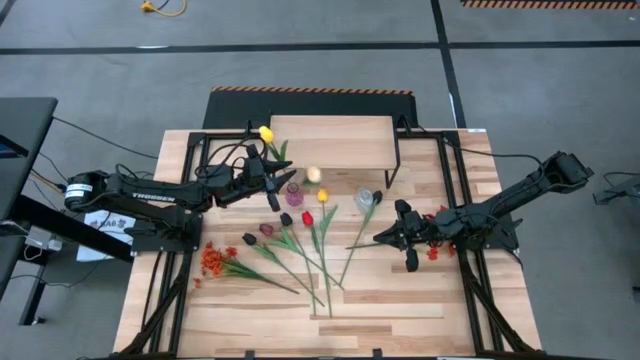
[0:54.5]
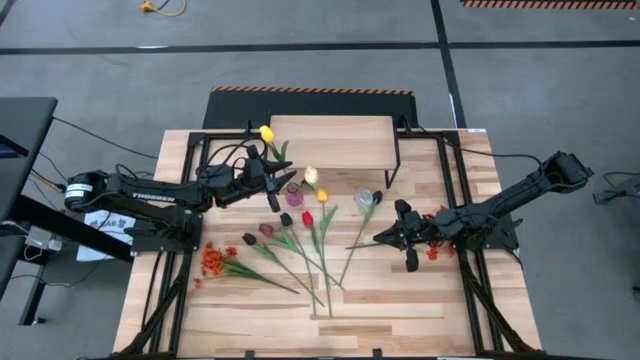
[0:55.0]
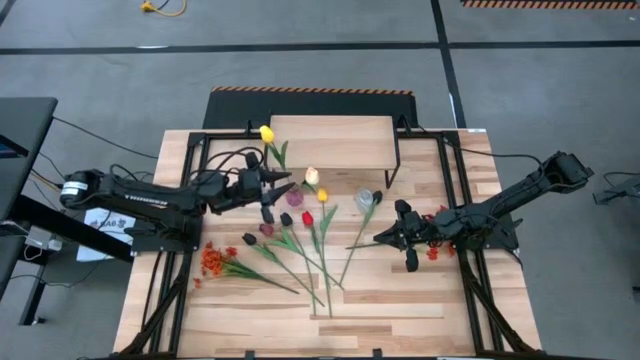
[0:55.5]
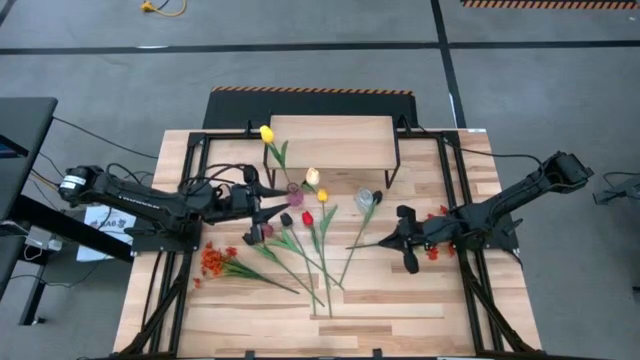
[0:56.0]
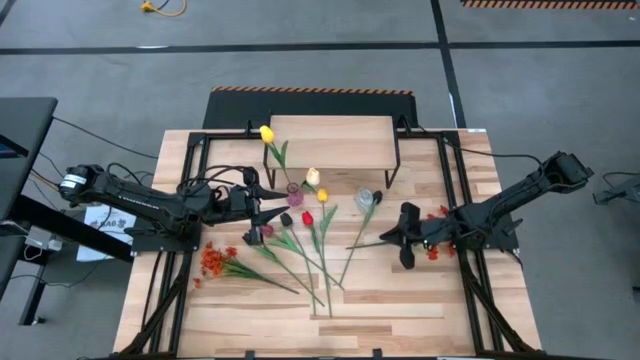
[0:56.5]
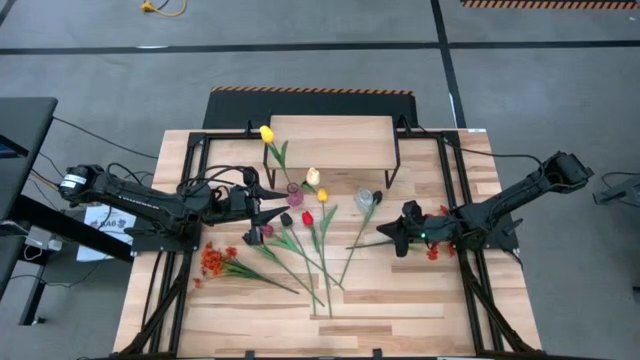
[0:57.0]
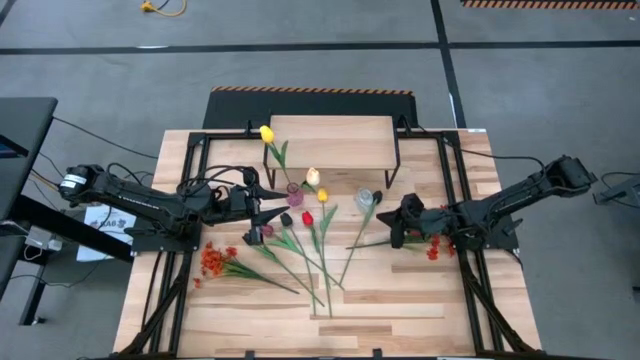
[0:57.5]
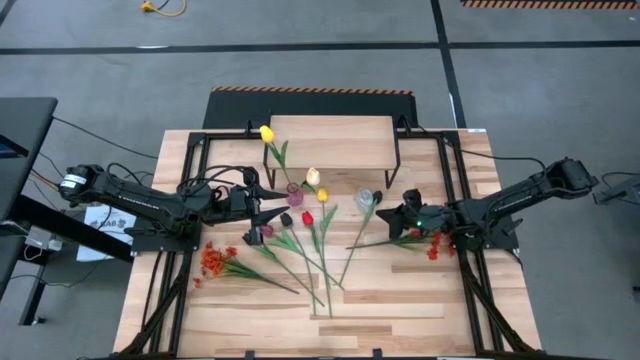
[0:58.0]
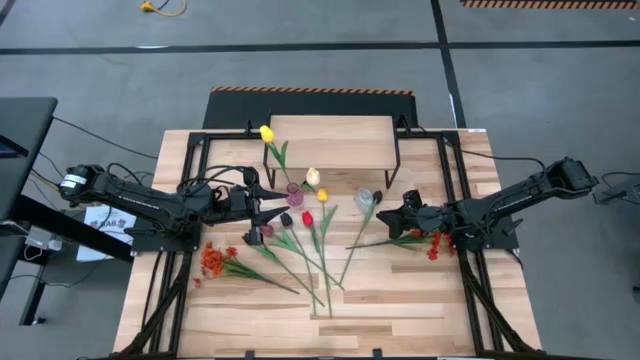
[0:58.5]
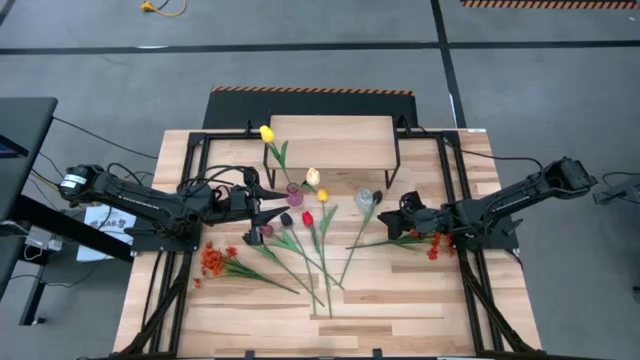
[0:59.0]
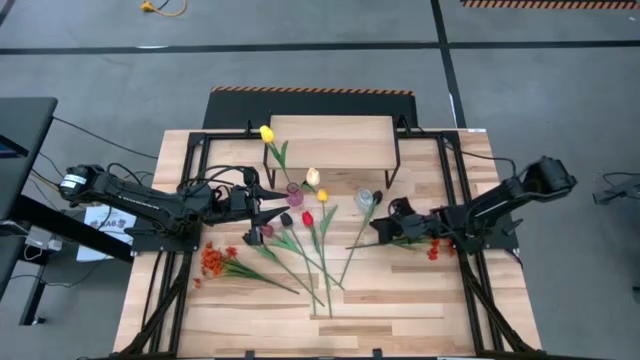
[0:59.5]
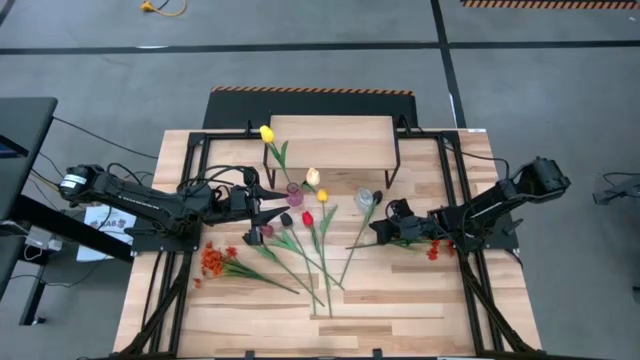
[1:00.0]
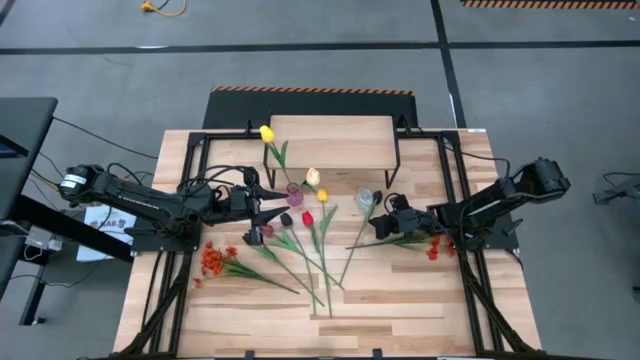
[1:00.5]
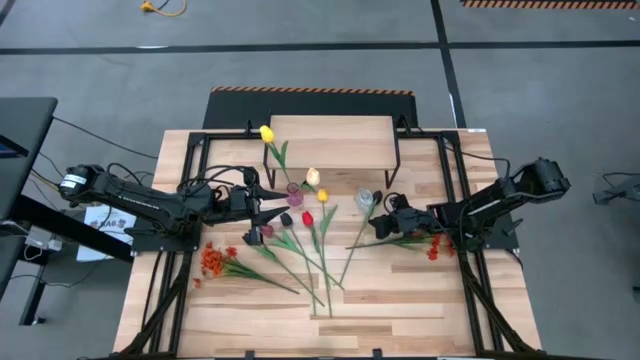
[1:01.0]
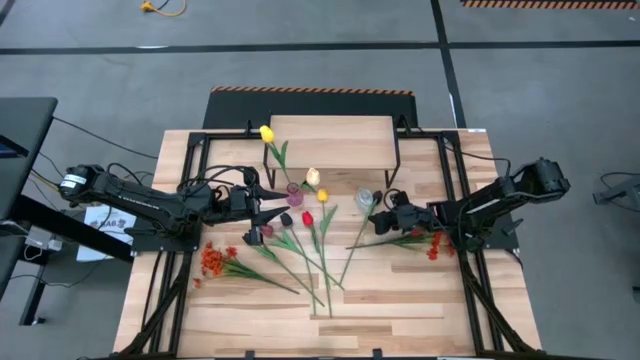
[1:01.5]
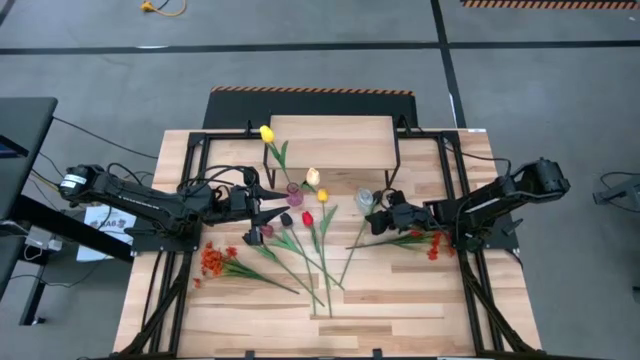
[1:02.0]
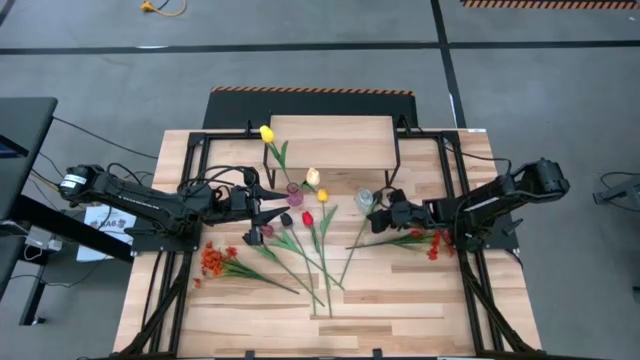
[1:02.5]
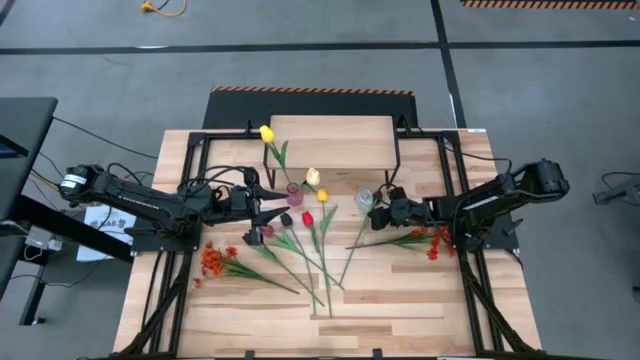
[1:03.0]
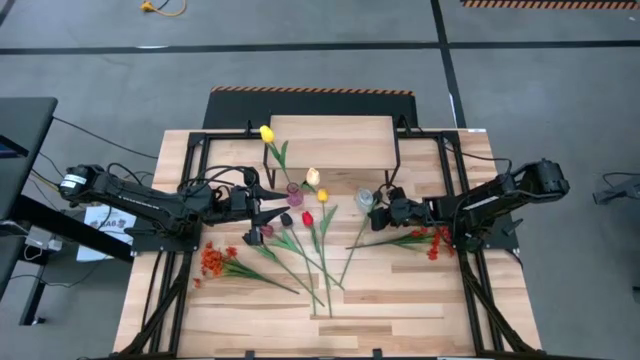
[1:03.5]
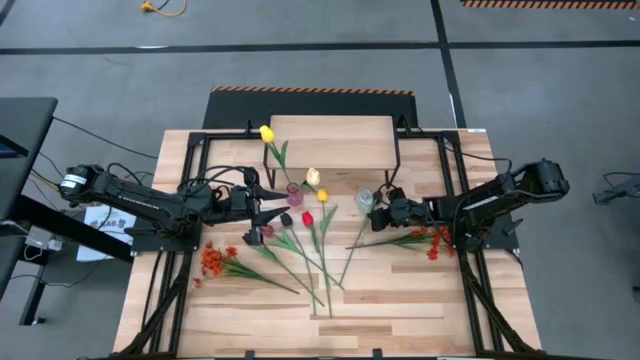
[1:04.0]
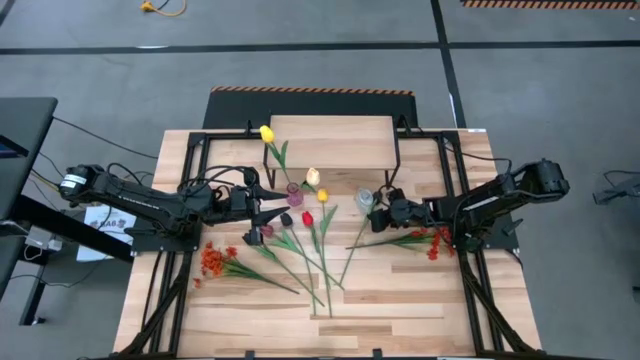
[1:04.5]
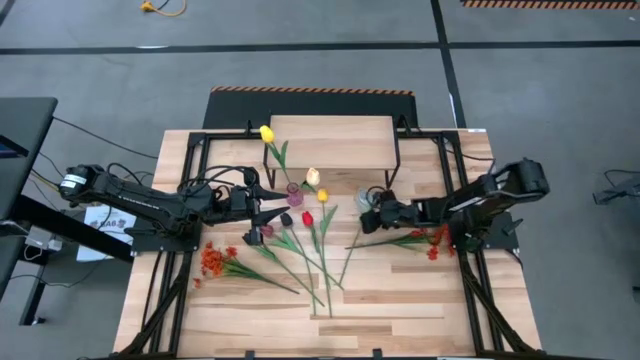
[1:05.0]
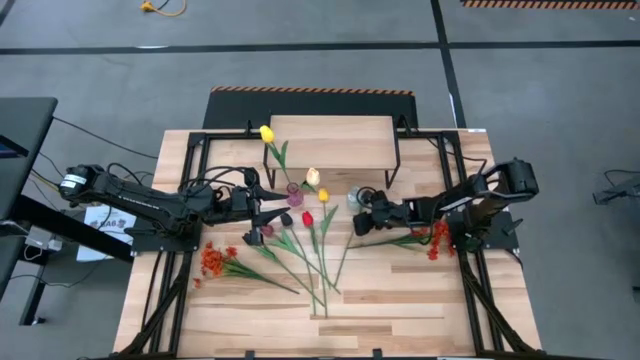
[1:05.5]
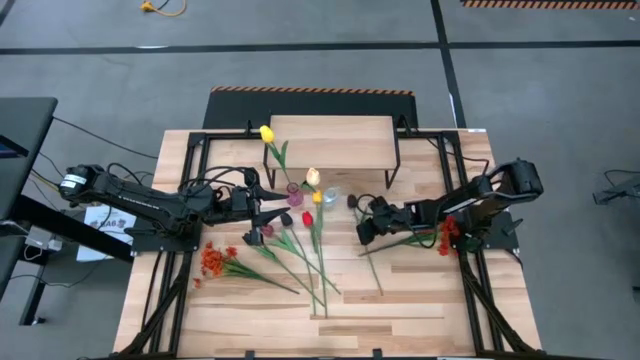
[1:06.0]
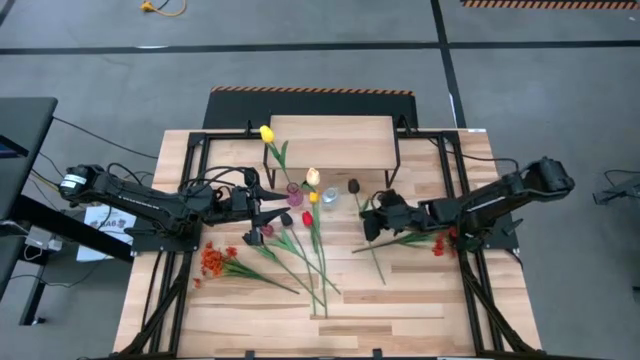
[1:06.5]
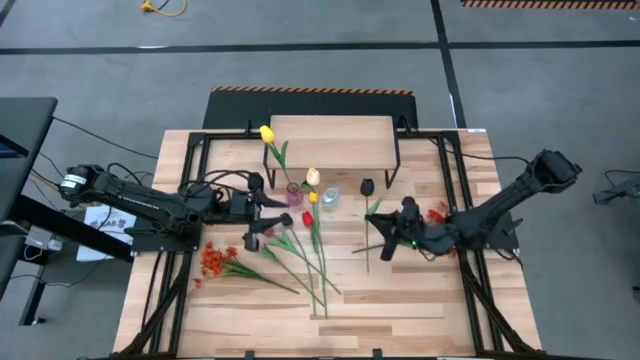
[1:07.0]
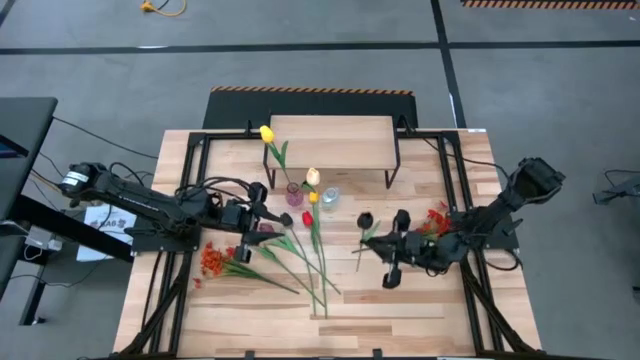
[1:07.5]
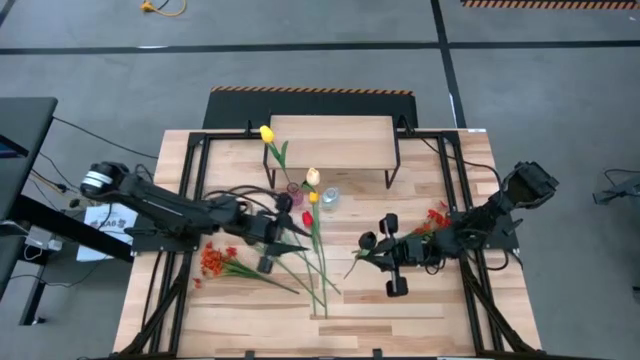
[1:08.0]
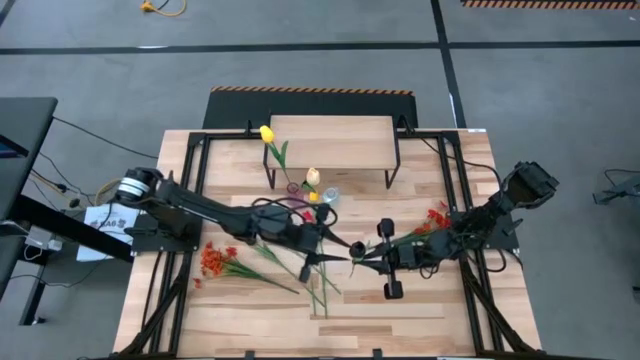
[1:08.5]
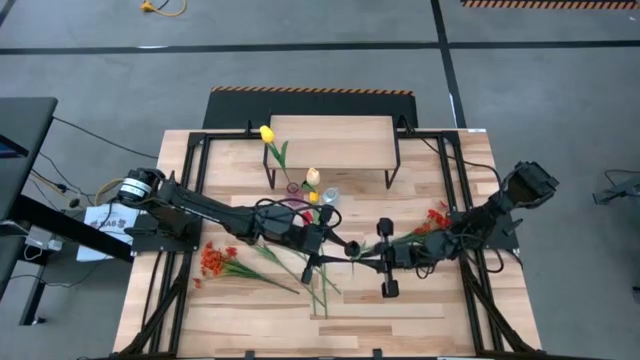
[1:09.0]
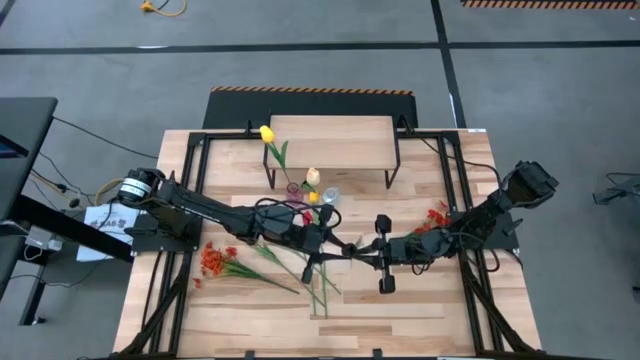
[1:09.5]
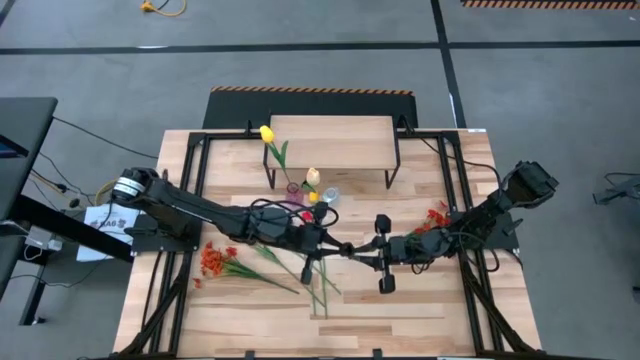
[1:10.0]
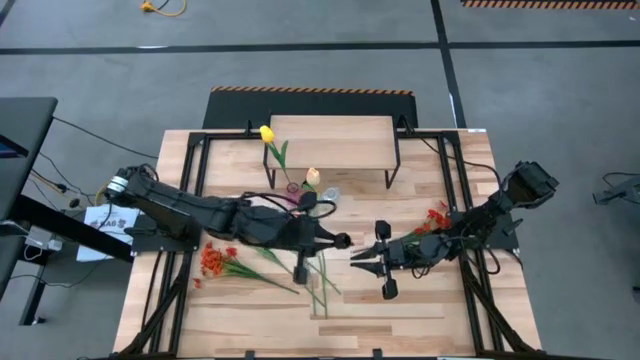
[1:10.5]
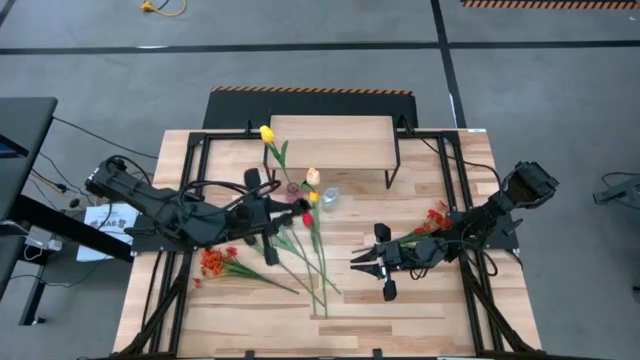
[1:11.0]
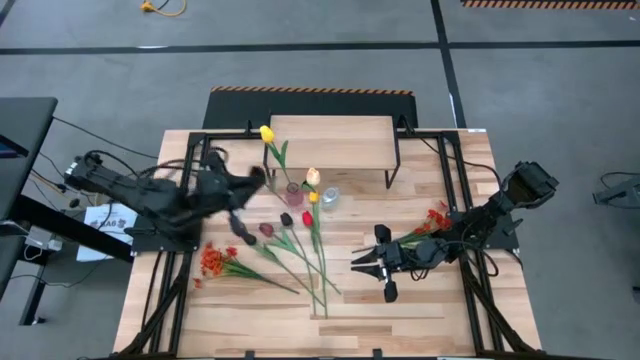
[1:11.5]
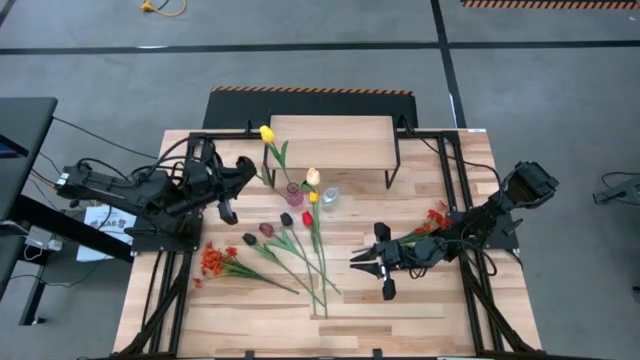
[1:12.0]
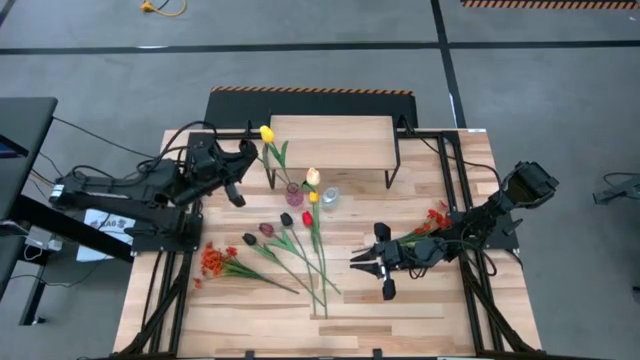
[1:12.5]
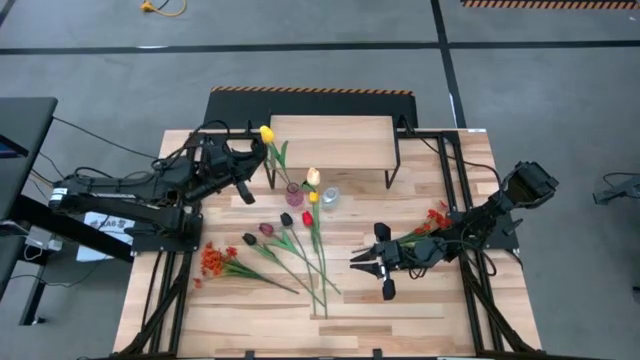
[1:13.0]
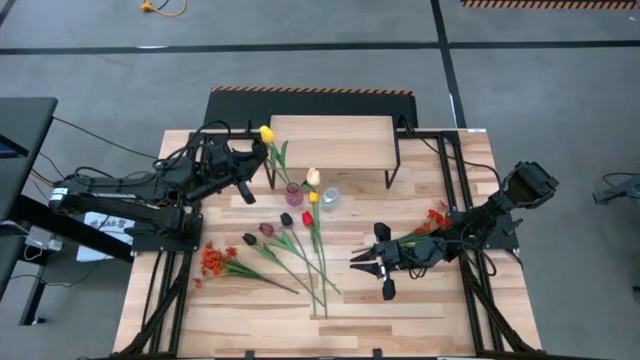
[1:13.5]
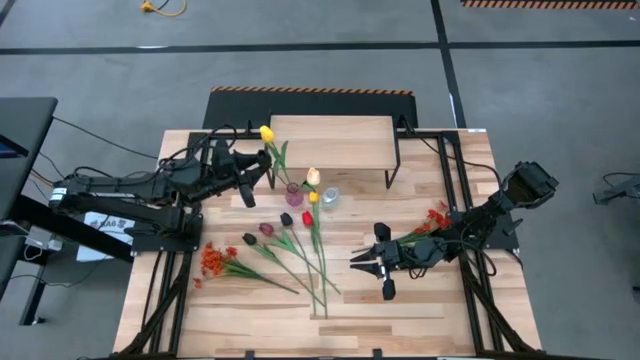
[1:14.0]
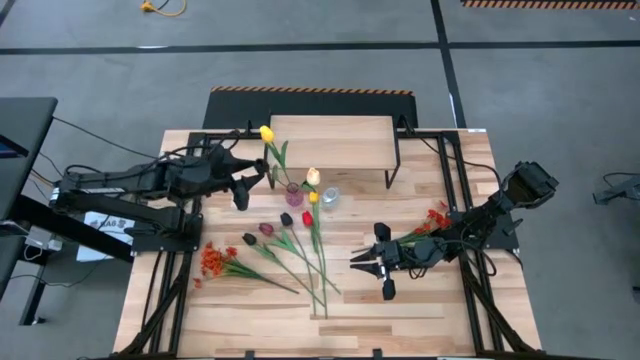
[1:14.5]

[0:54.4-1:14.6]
Task: Pick and place flowers into a vace then onto a shelf
Put the top black tulip into the purple vase

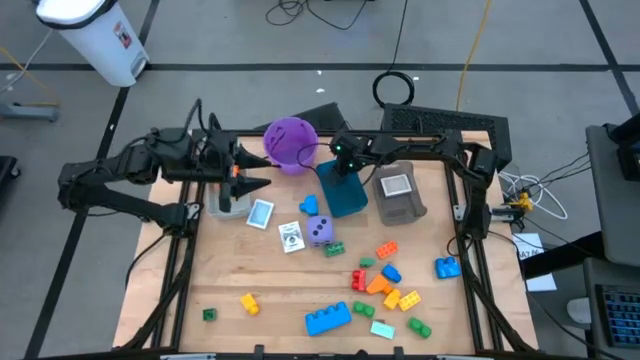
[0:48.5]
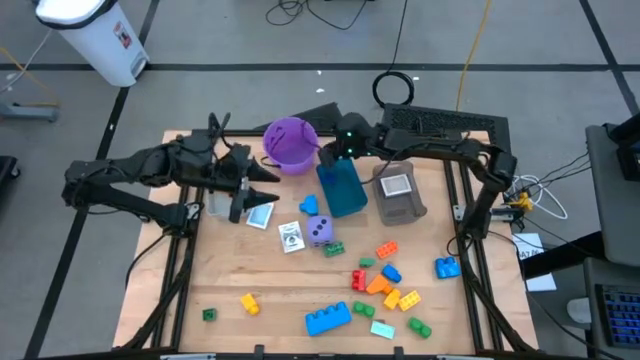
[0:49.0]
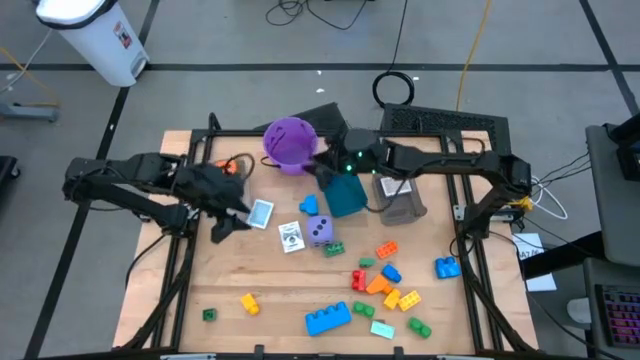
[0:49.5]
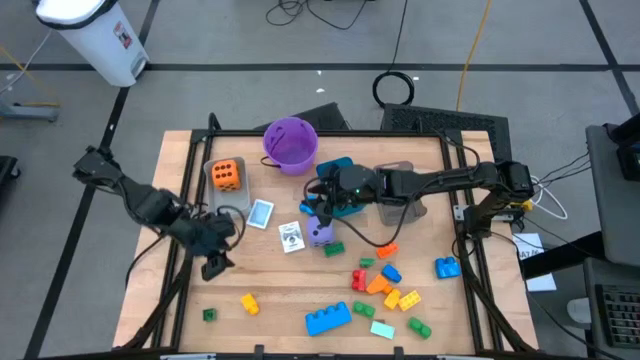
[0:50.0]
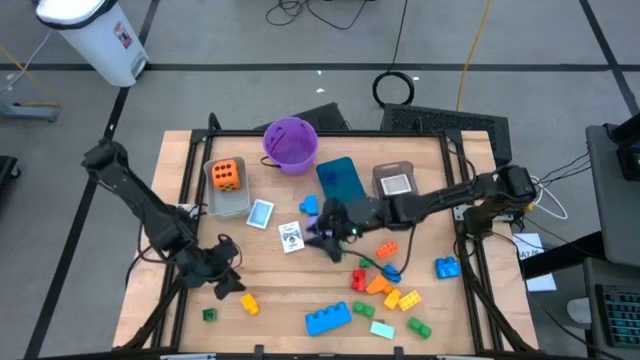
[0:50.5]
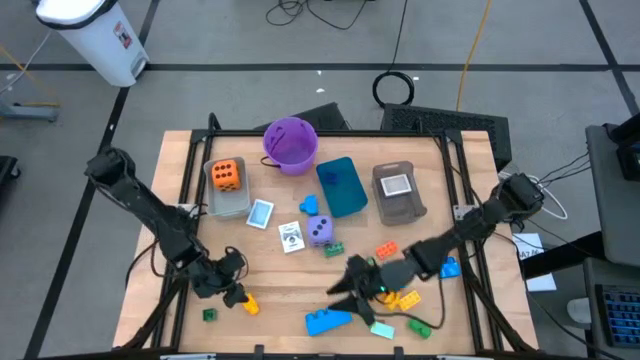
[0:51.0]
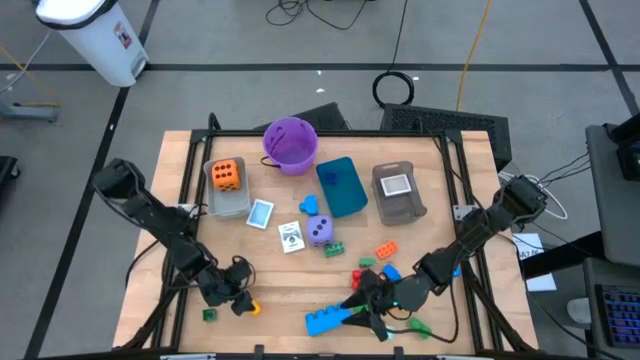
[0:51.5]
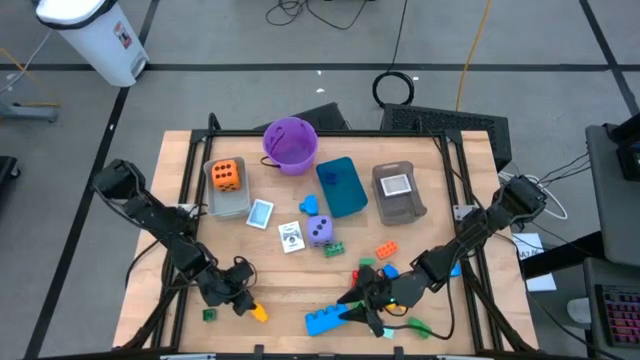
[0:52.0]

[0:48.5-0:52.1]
Task: Pick & Place Toys
Put the yellow game piece into the blue bin
